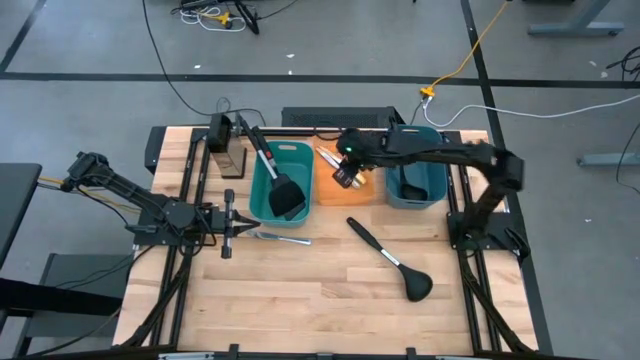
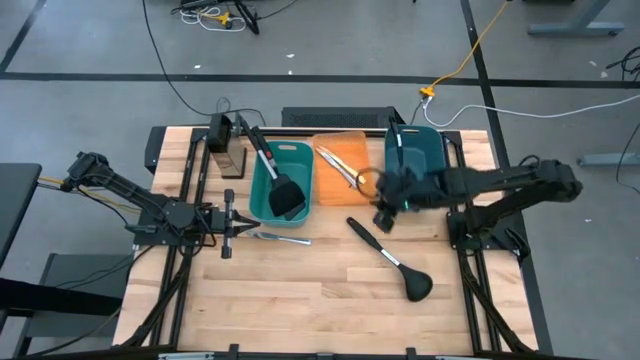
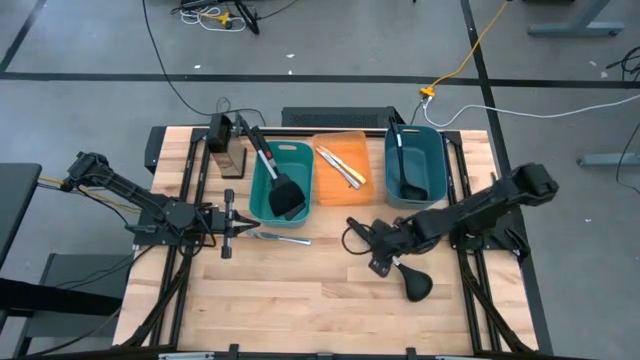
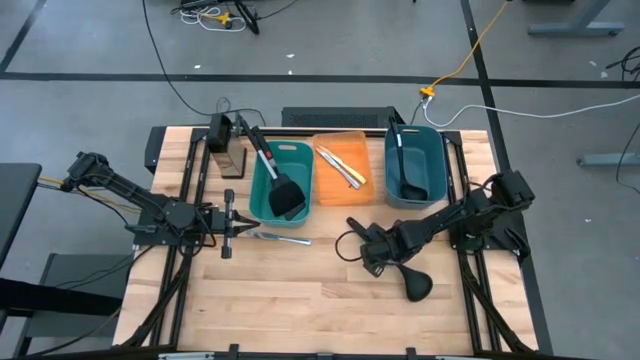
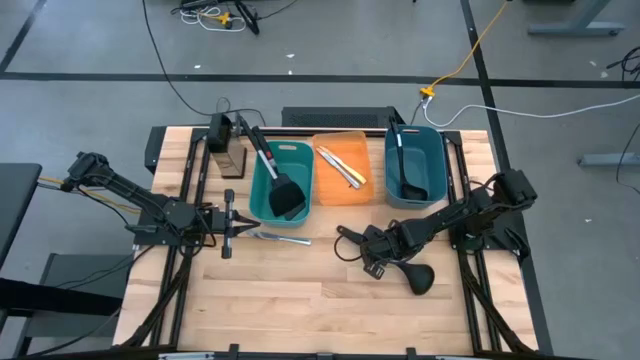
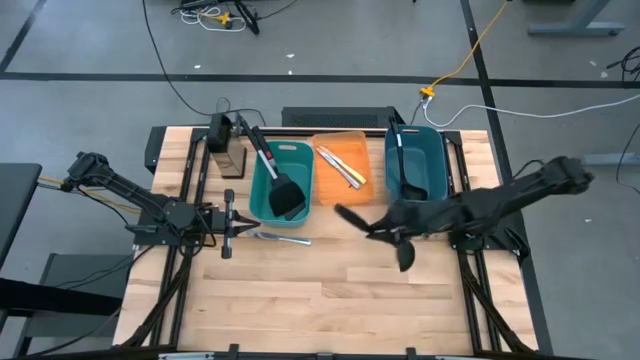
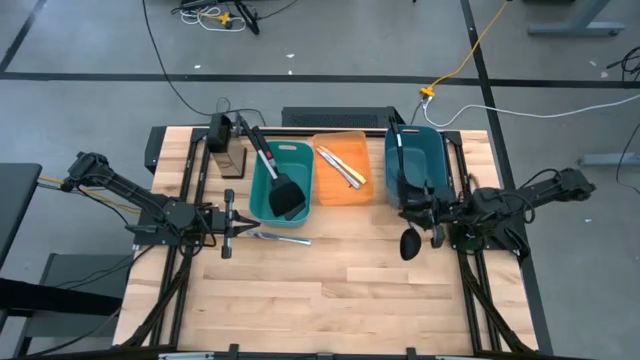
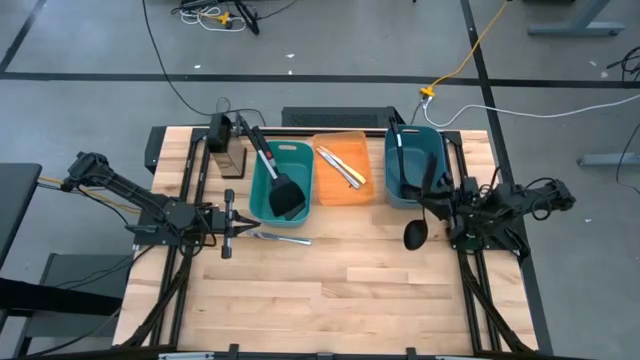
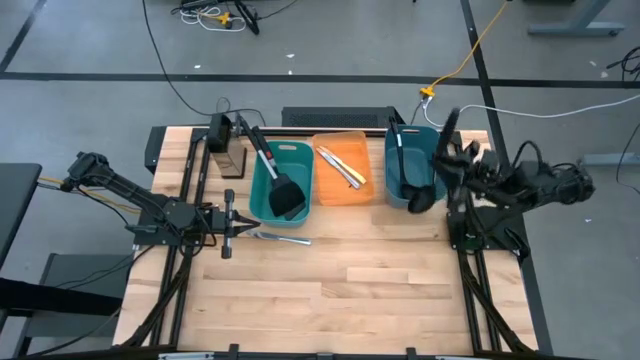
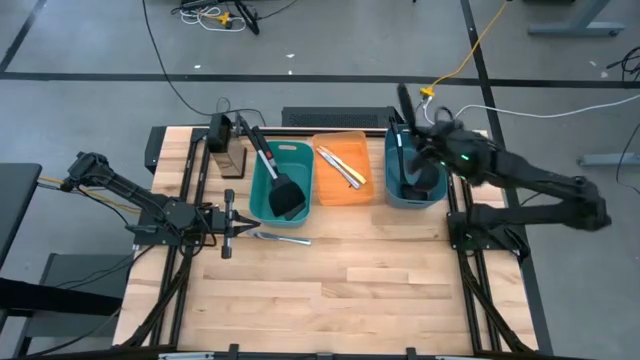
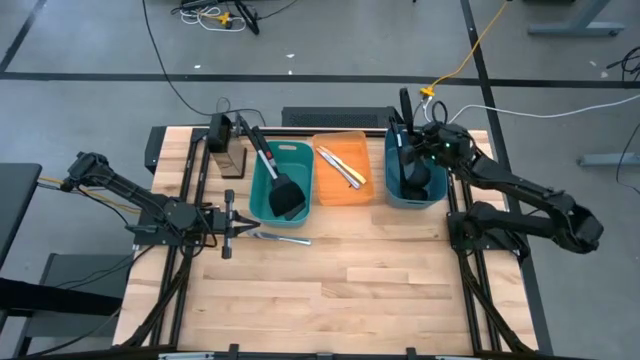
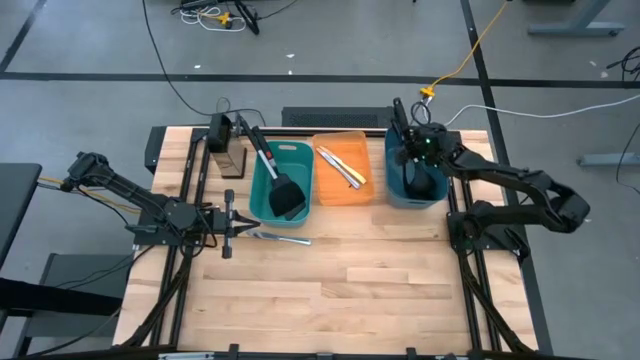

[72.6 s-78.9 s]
Task: Pick & Place Kitchen Items
Put the black serving spoon into the green bin

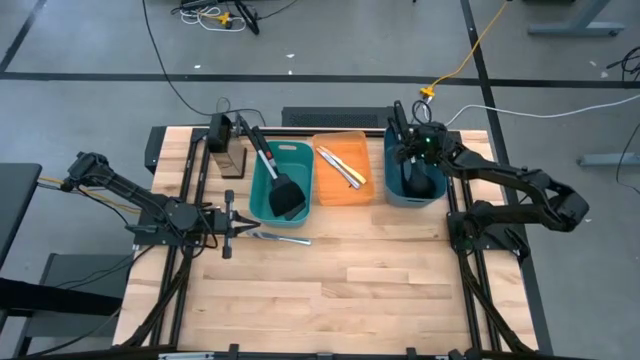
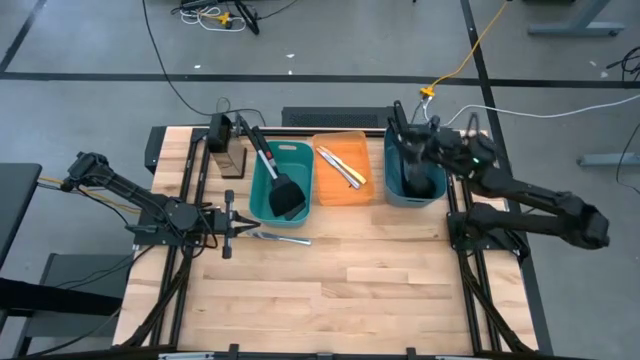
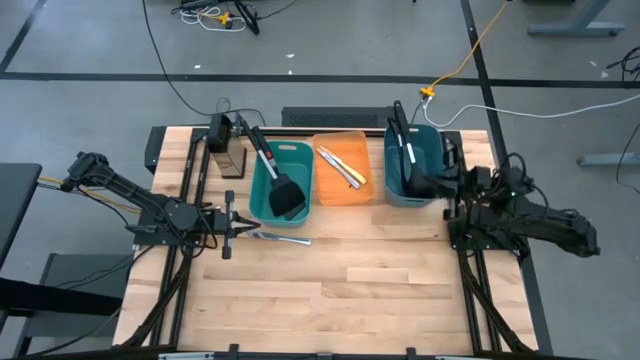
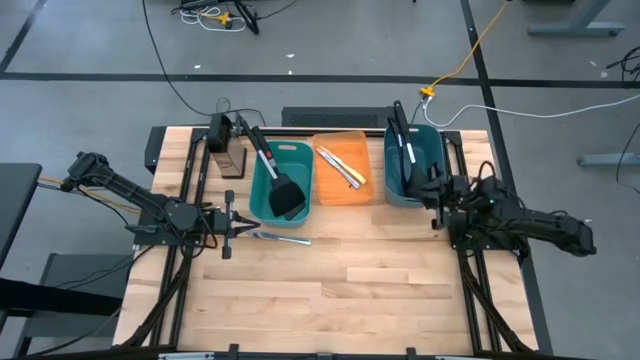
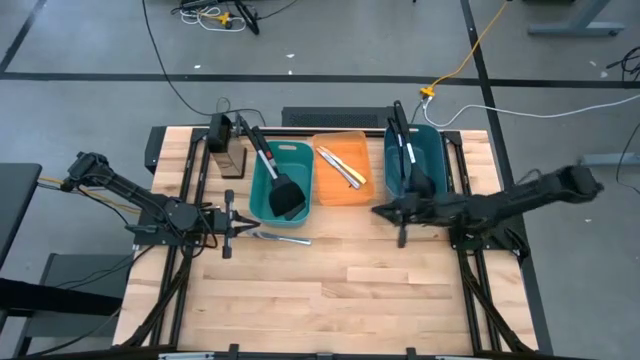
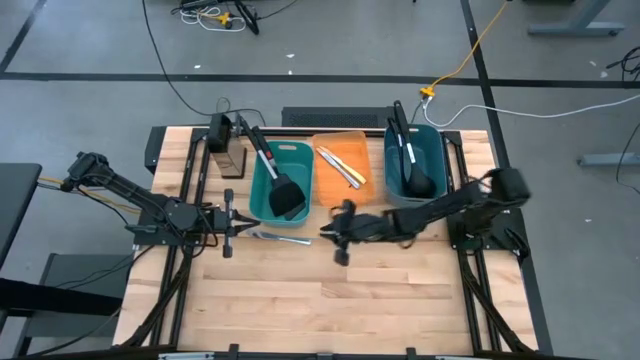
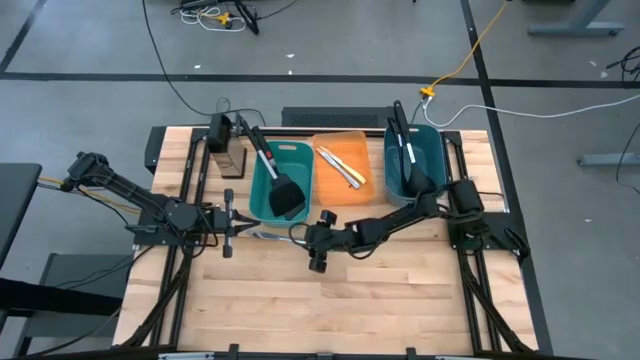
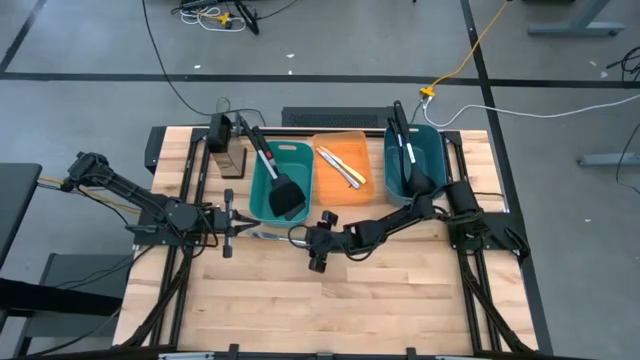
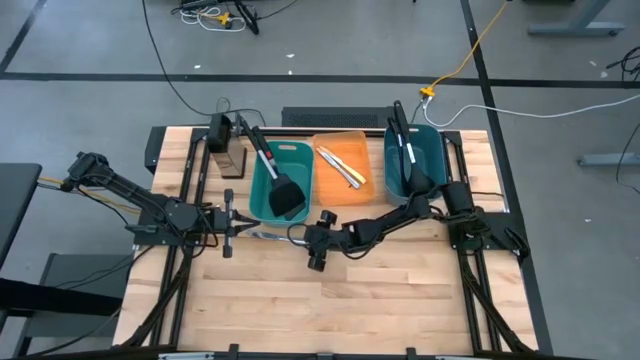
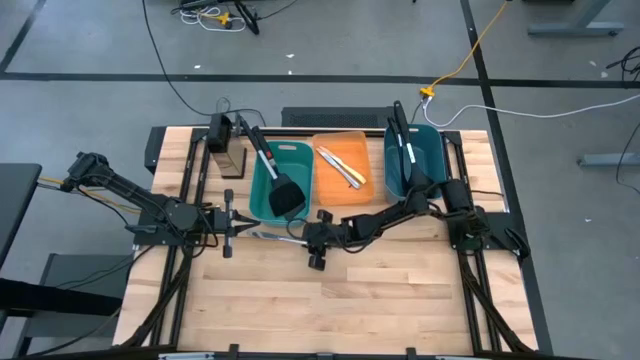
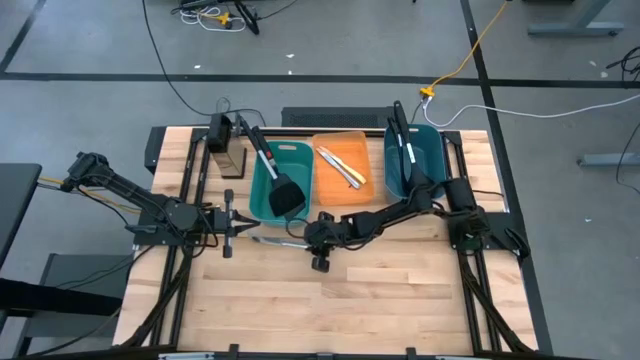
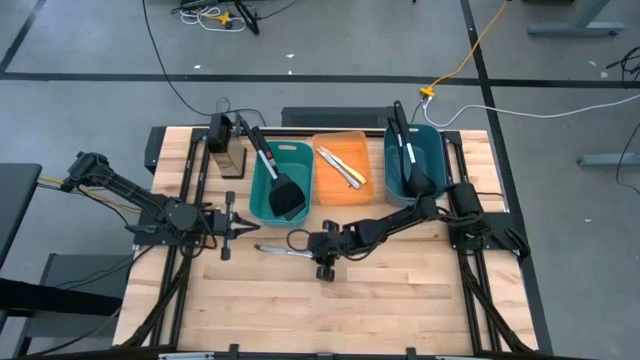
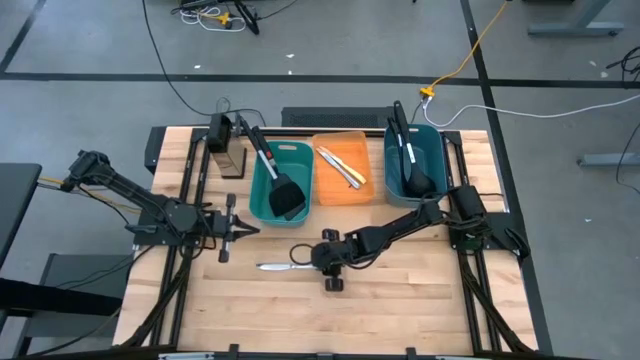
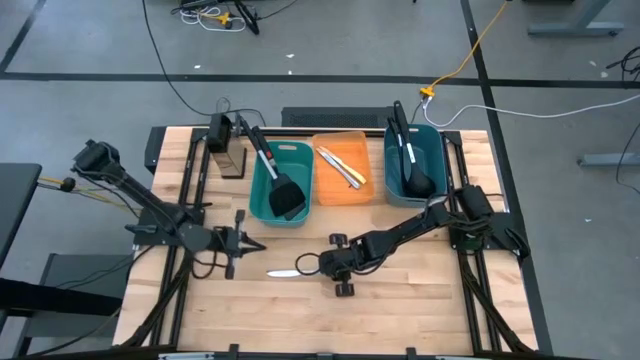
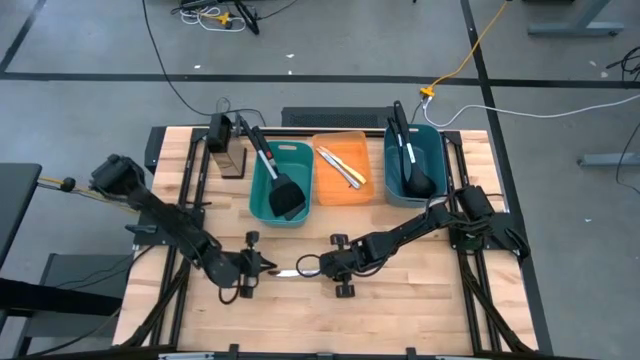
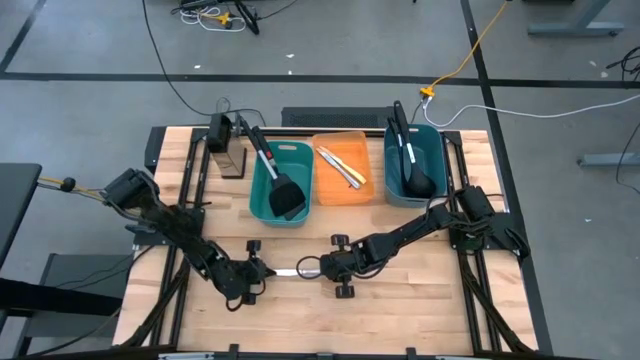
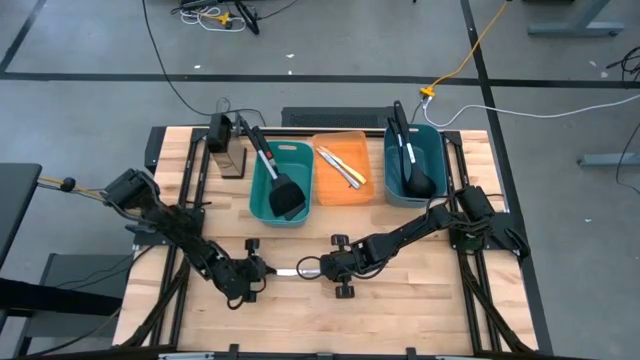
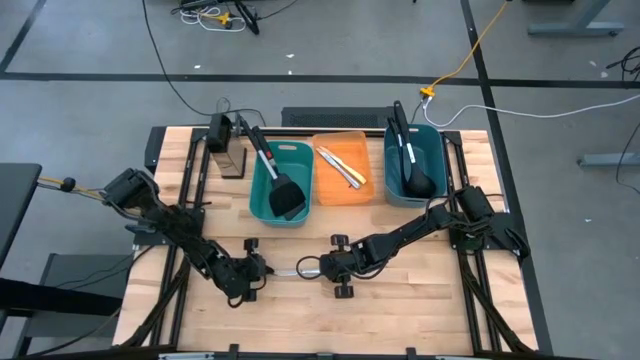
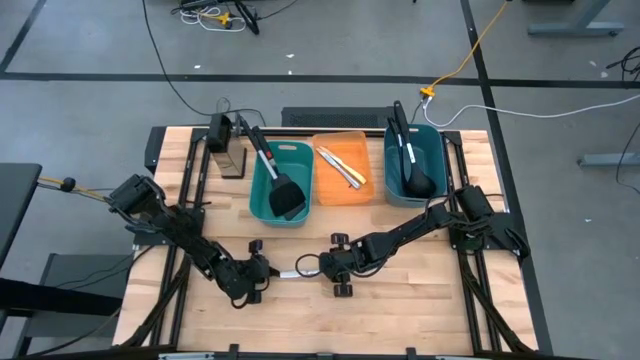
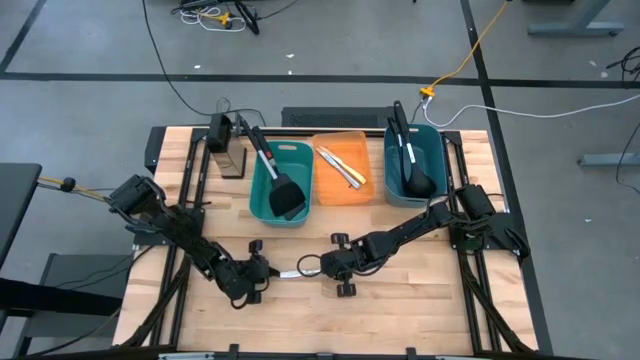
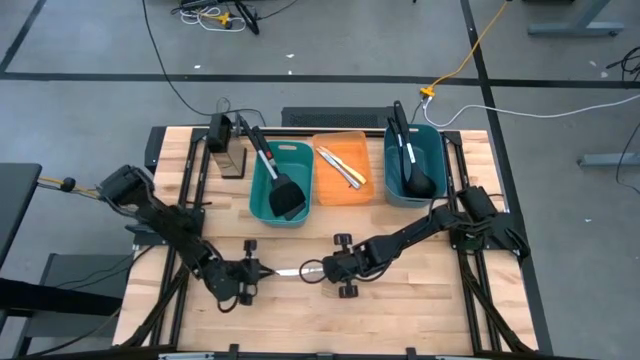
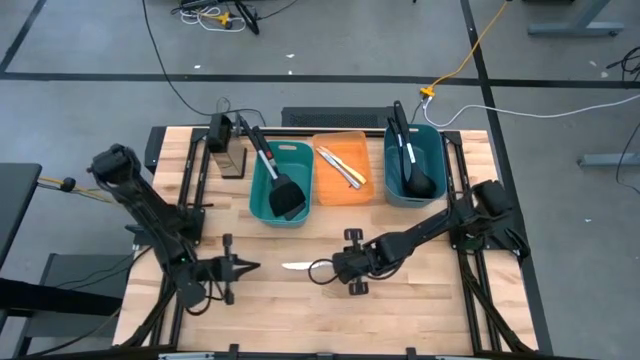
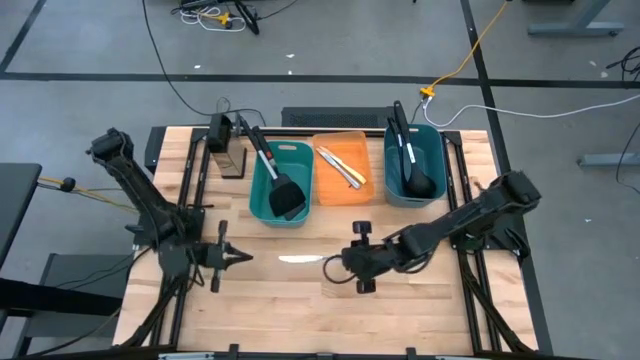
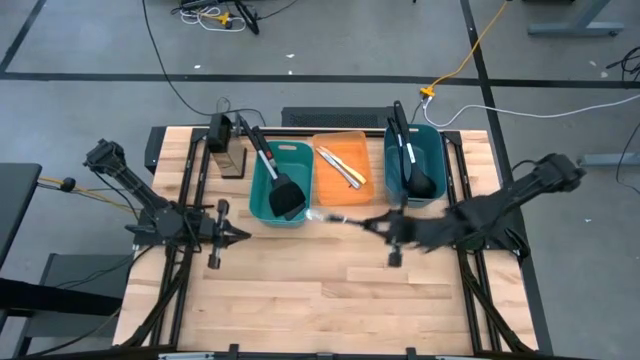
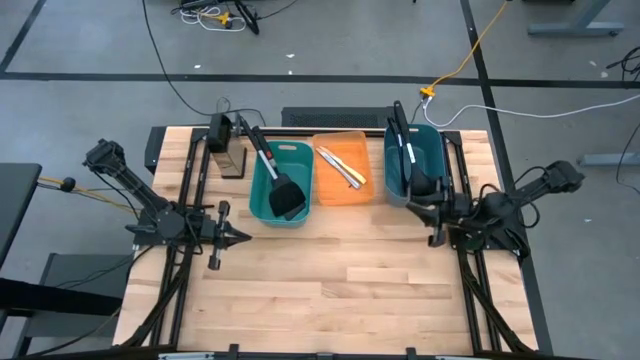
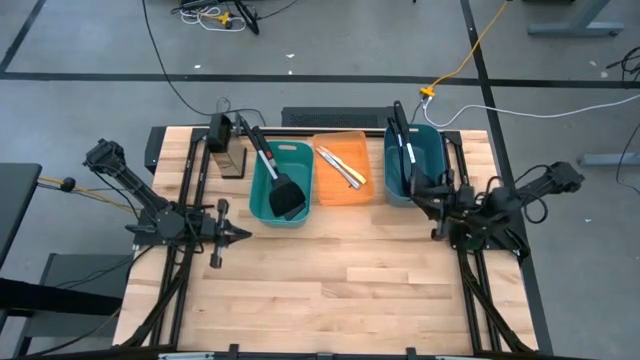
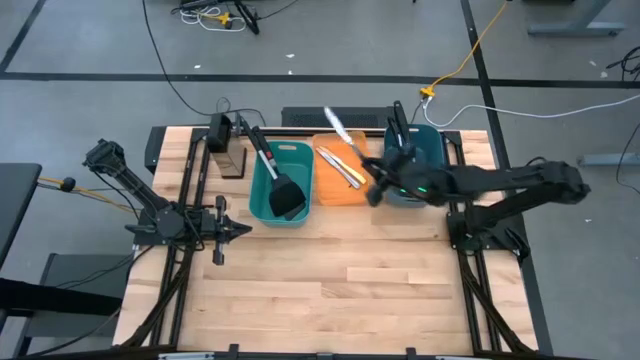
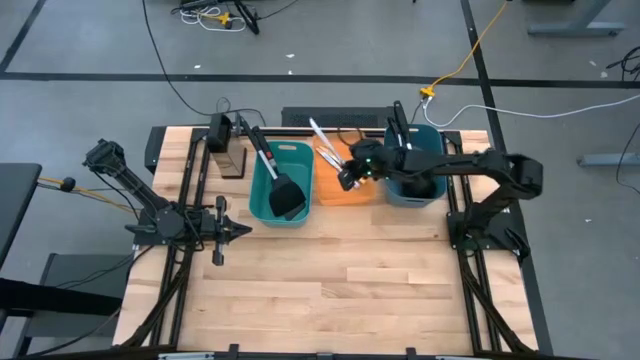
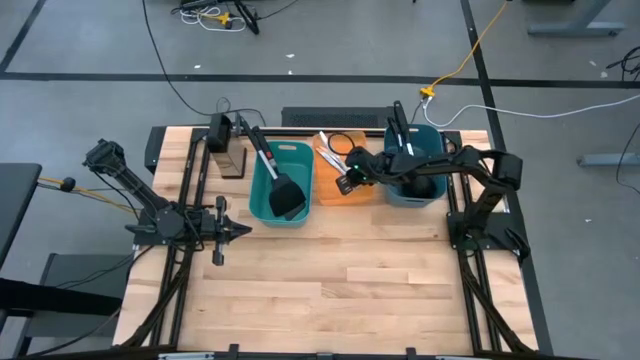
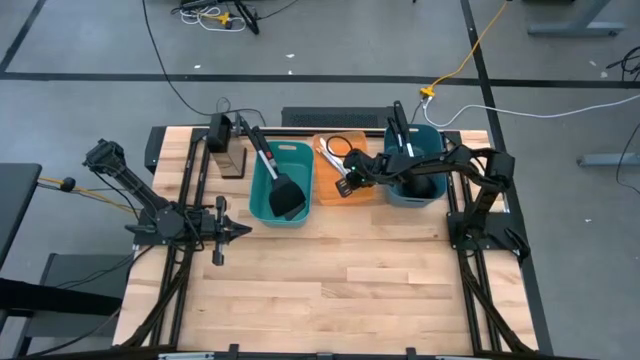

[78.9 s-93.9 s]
Put the silver table knife into the orange bin
